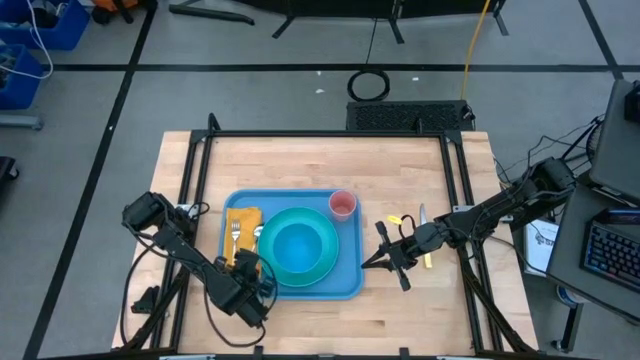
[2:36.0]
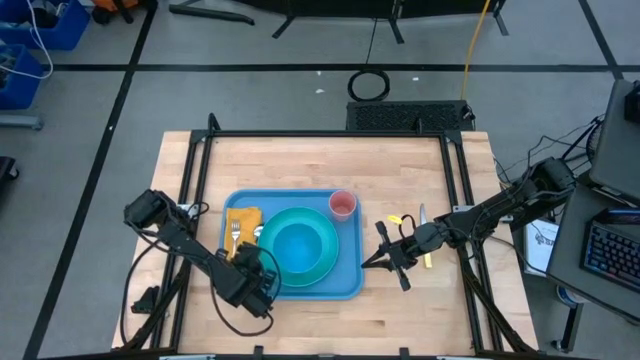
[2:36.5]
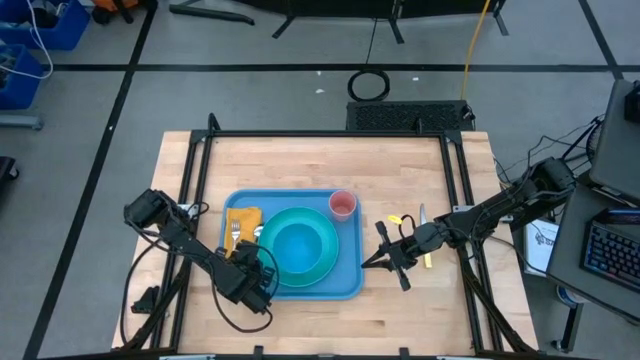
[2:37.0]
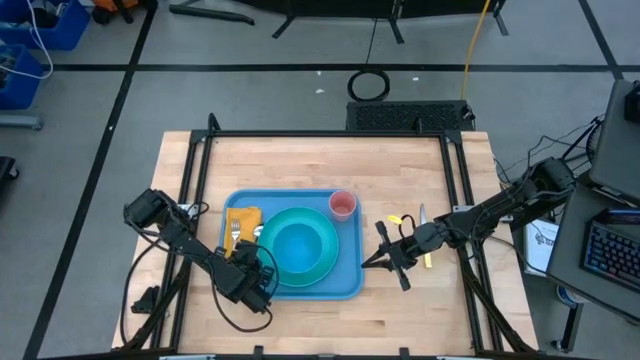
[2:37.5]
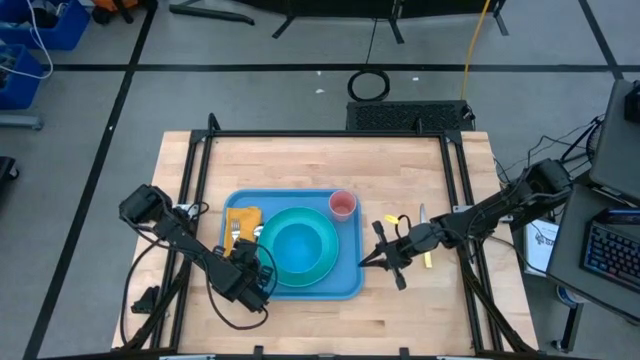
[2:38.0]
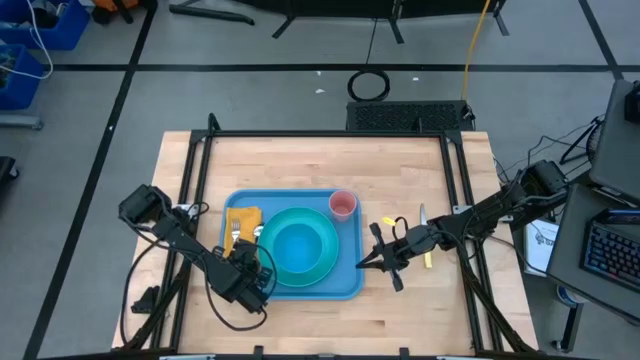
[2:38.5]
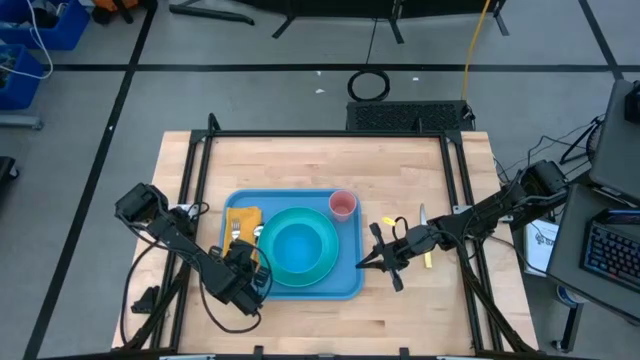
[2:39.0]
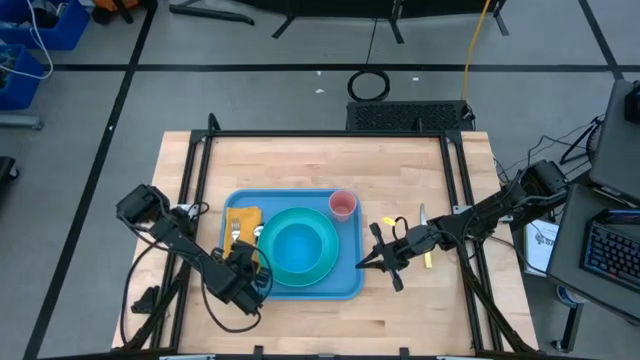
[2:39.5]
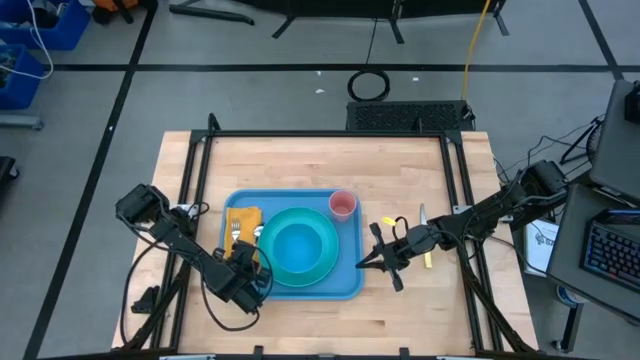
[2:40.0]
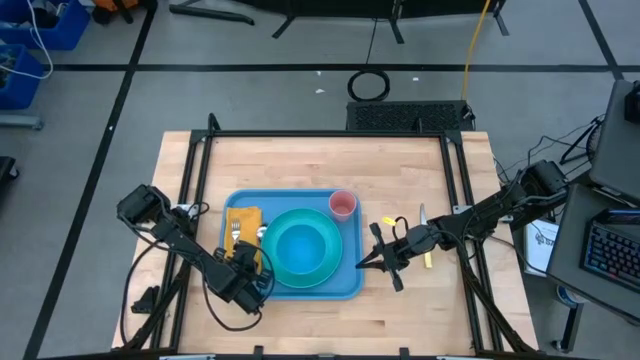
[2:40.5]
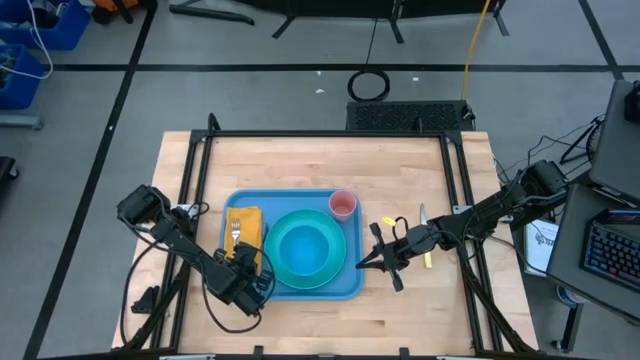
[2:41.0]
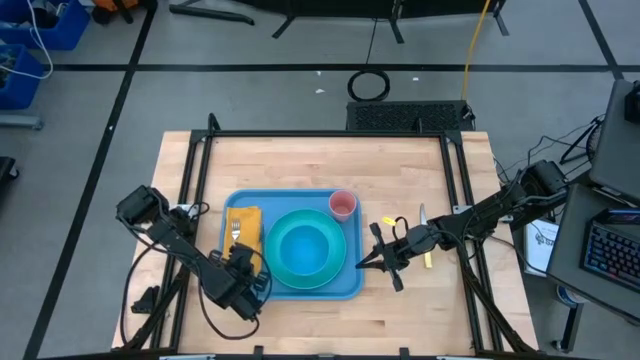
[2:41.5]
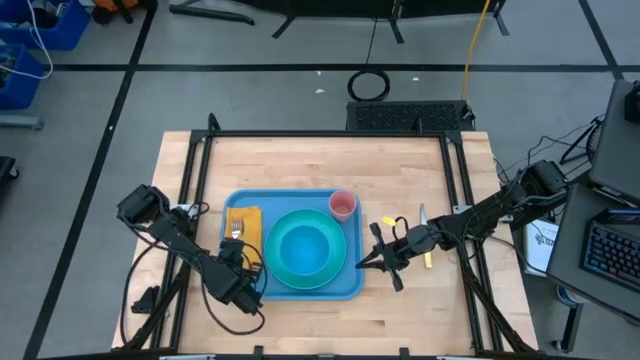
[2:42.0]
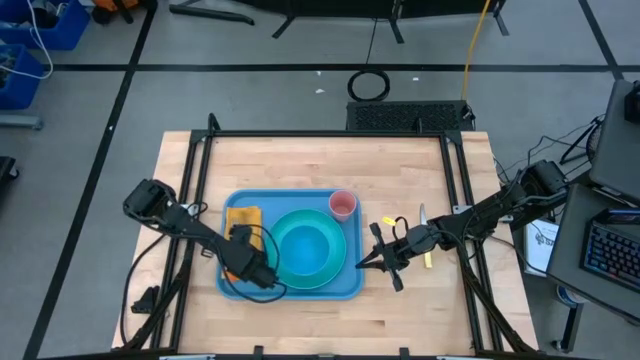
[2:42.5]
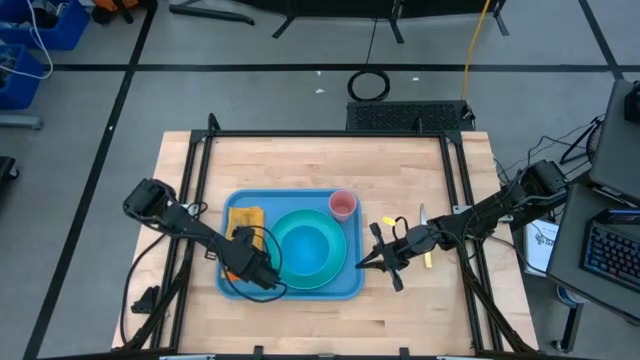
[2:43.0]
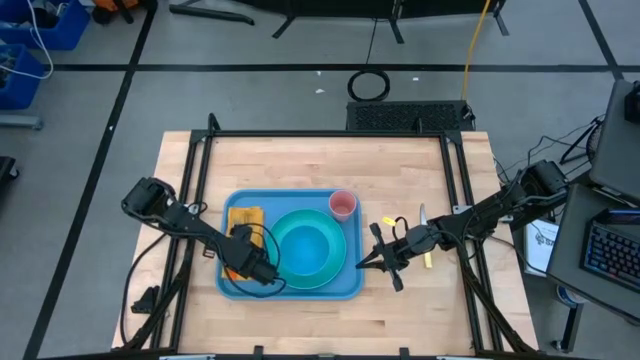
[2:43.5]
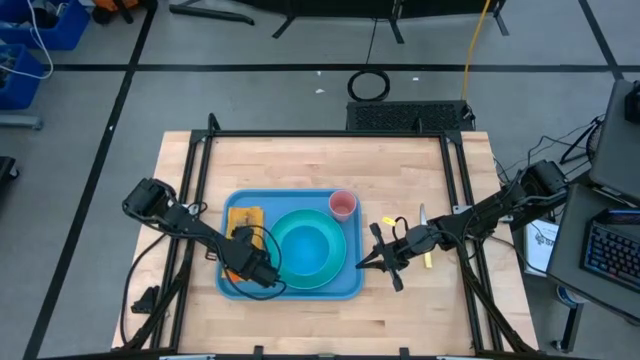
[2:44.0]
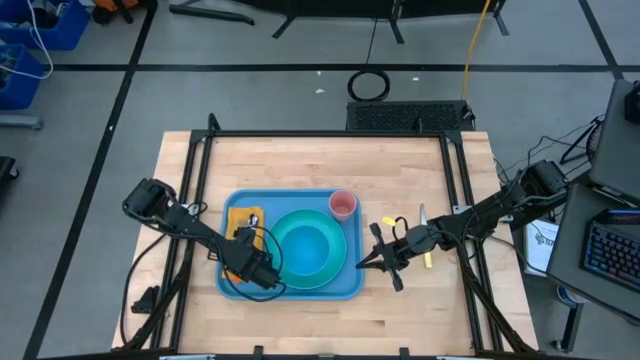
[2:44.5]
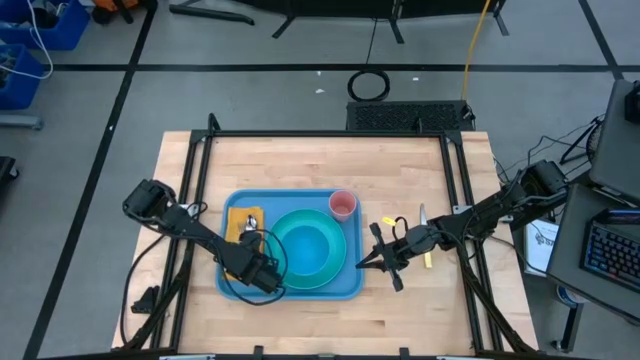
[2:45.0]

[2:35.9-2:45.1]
Task: Set up tray
Put the orange spoon on the blue serving tray to the right of the orange fork

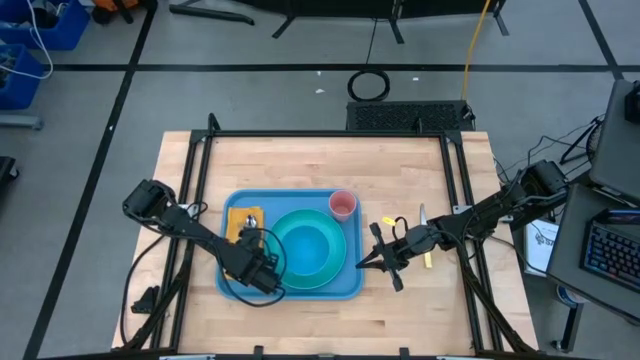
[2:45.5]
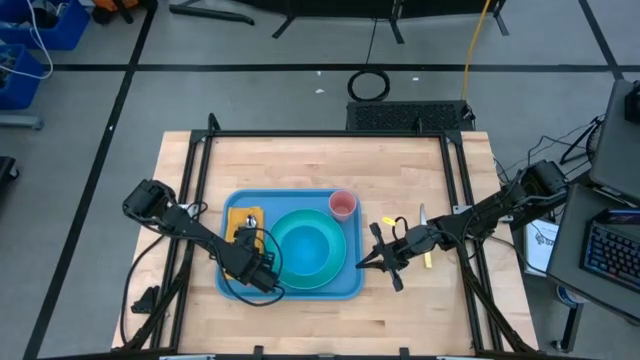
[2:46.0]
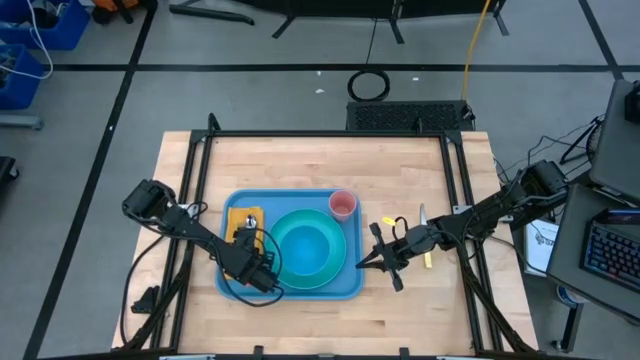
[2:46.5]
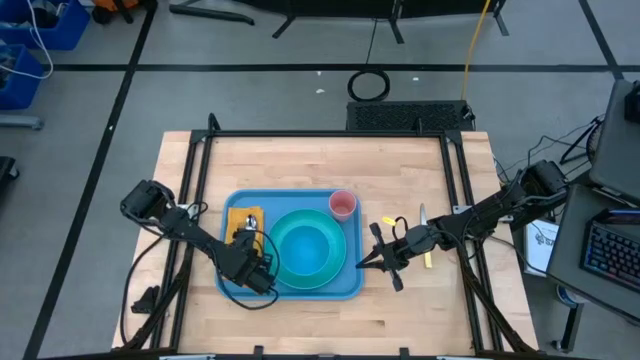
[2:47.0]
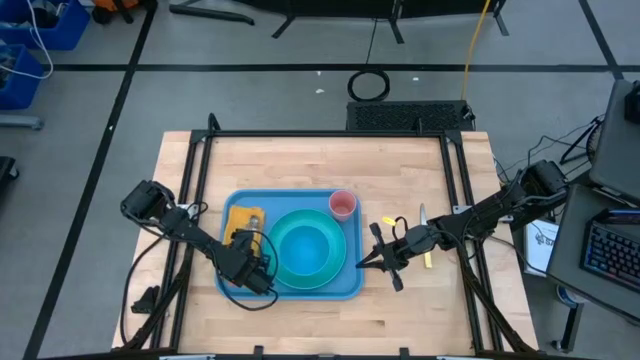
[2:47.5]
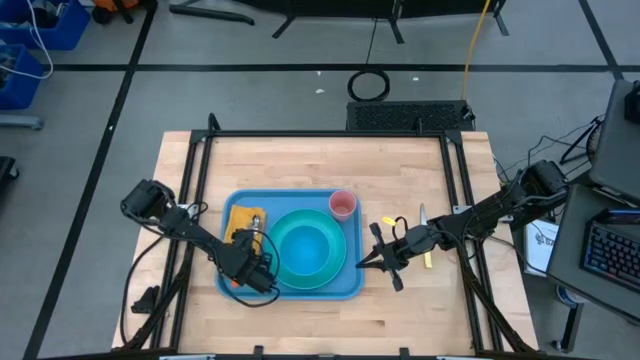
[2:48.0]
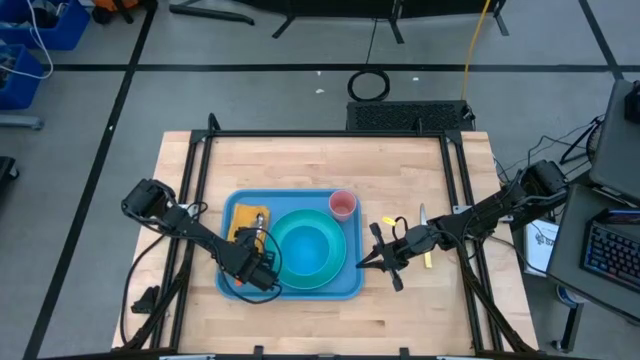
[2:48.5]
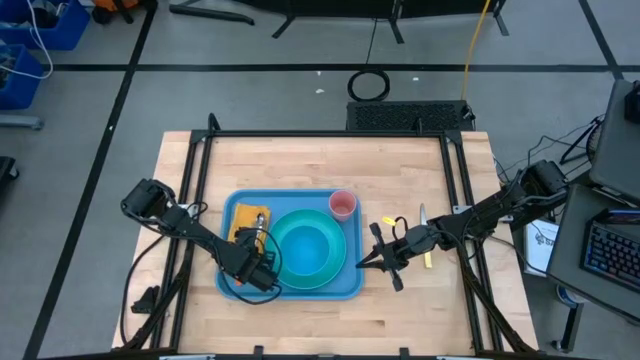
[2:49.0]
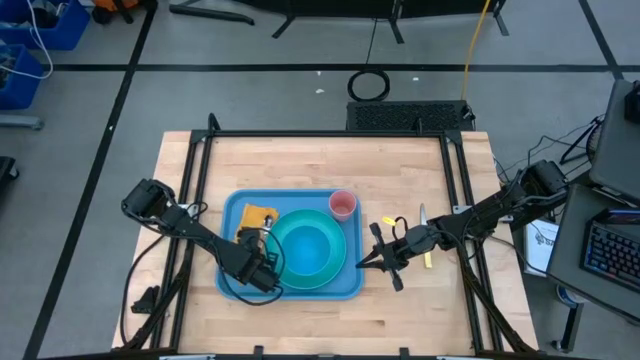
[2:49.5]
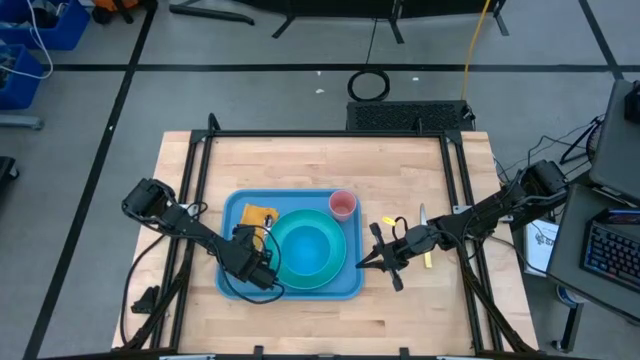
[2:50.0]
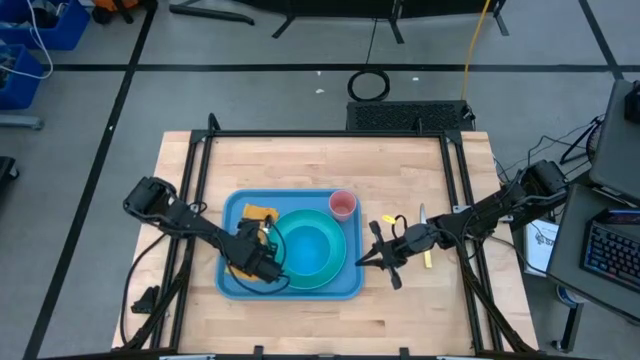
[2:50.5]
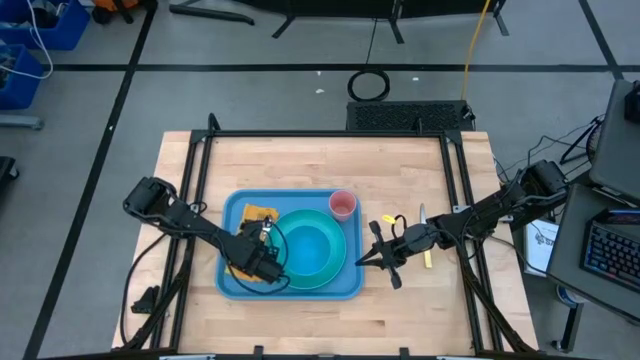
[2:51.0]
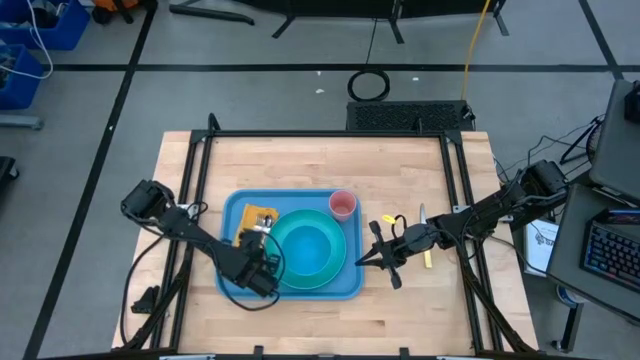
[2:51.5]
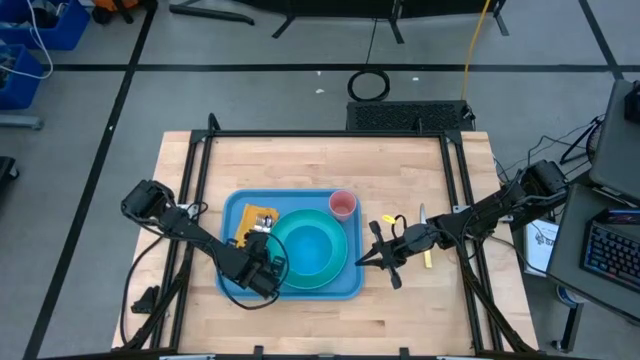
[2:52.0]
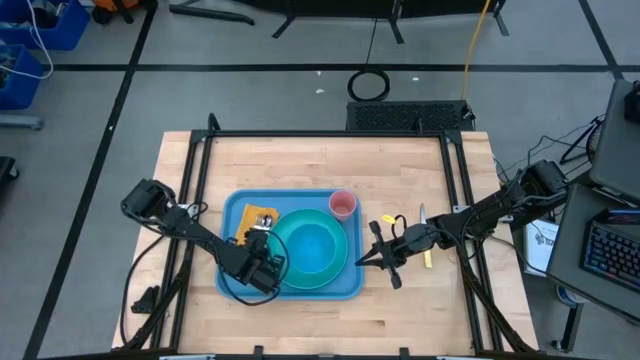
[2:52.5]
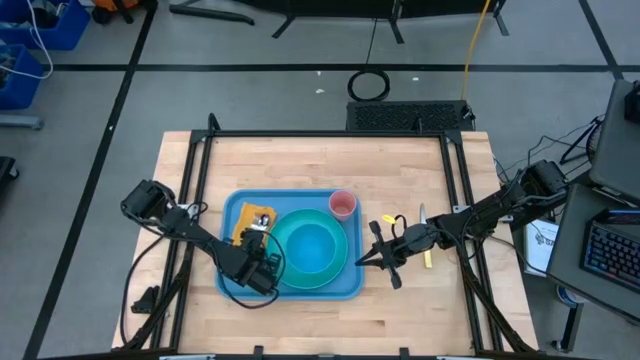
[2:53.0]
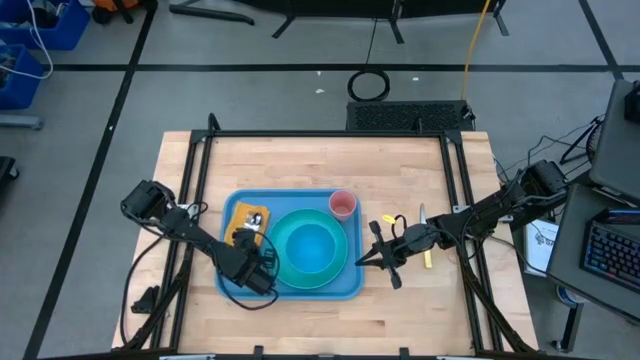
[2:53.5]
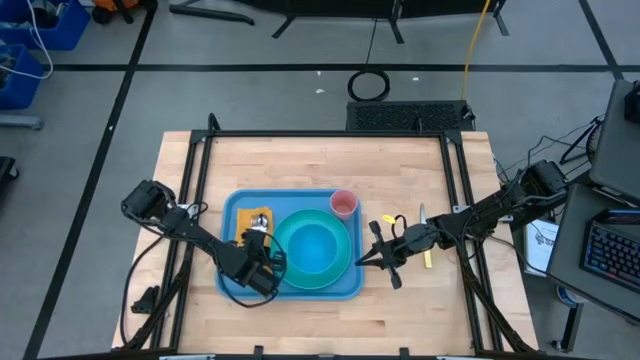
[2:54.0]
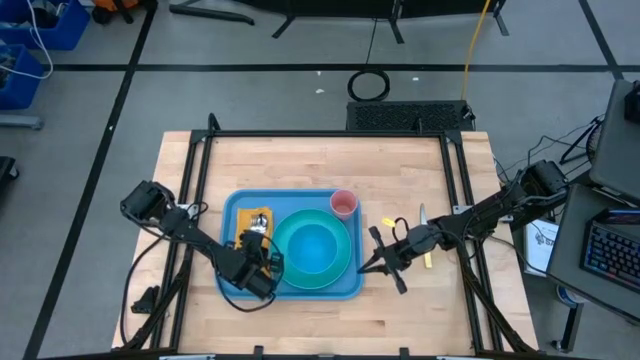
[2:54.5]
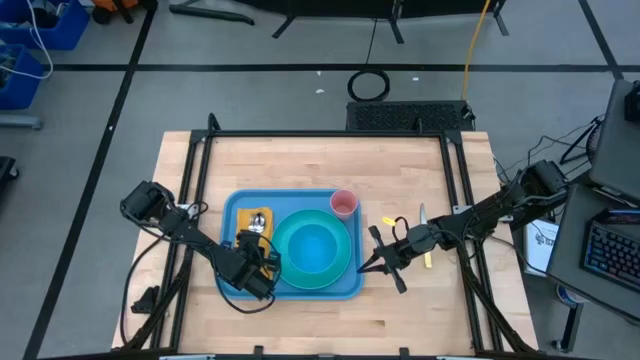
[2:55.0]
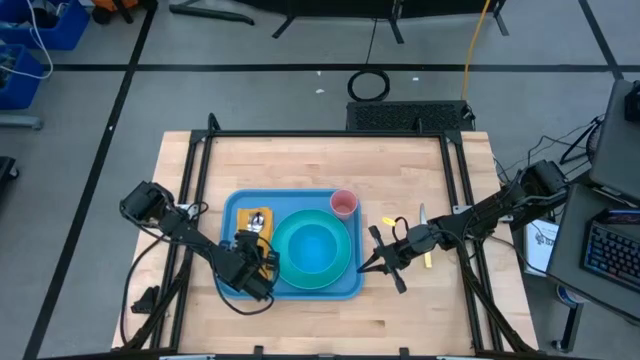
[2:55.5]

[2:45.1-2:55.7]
Adjust the orange fork and orange spoon on the yellow napkin
